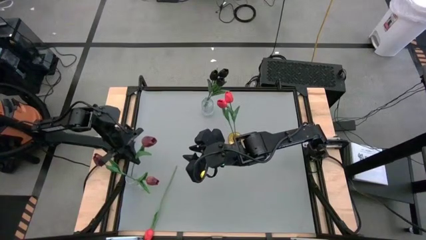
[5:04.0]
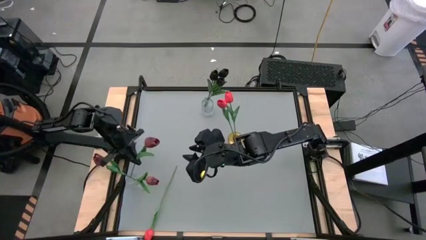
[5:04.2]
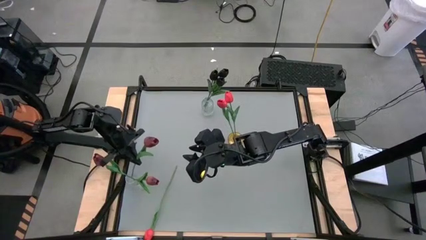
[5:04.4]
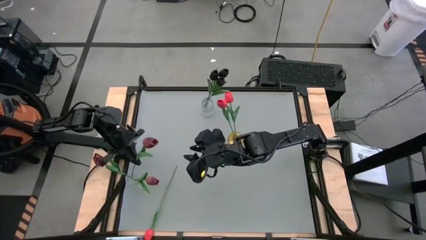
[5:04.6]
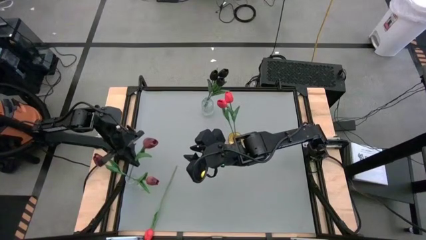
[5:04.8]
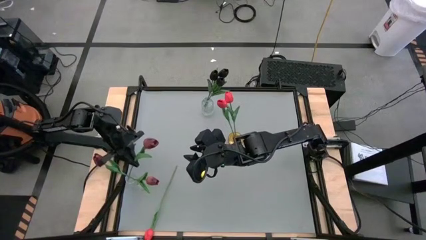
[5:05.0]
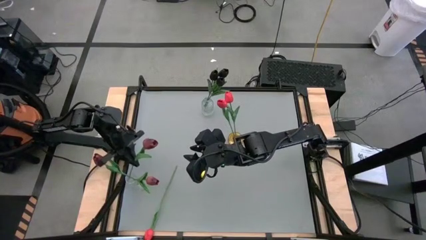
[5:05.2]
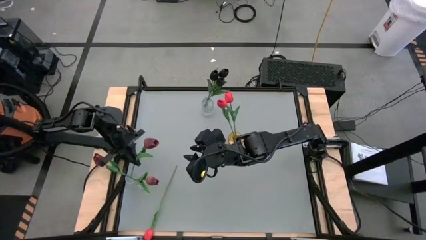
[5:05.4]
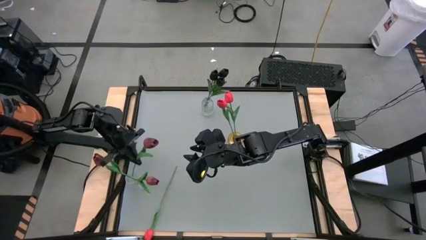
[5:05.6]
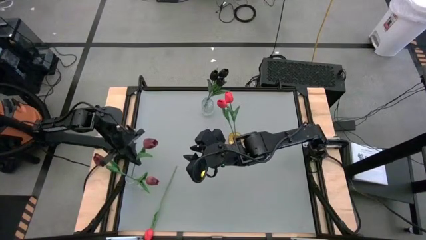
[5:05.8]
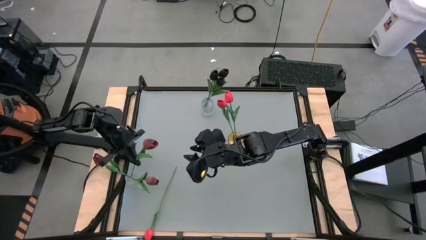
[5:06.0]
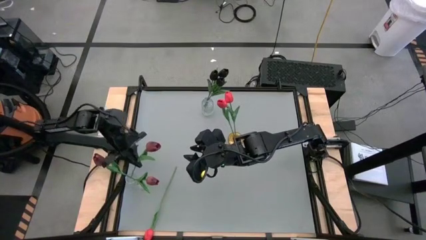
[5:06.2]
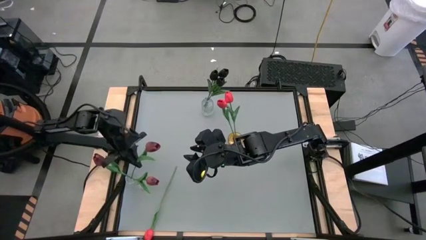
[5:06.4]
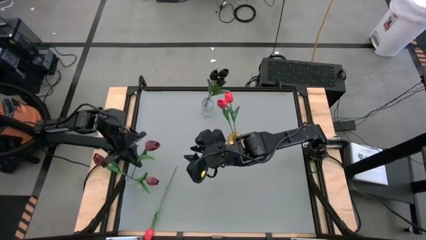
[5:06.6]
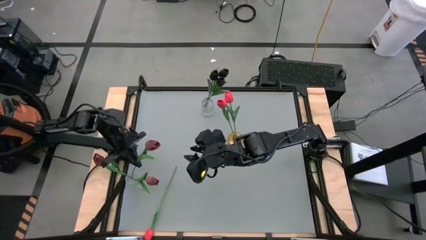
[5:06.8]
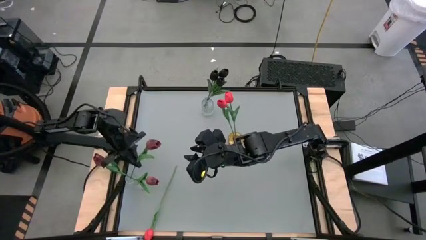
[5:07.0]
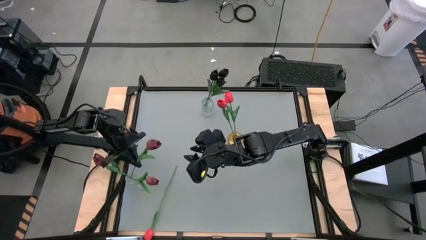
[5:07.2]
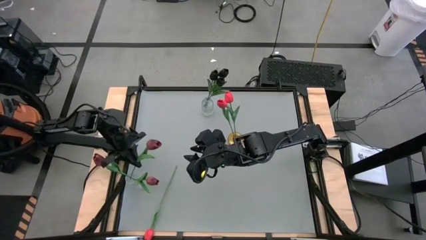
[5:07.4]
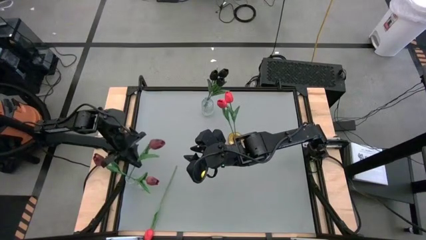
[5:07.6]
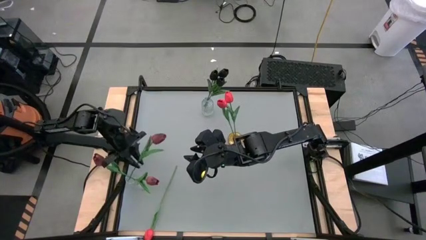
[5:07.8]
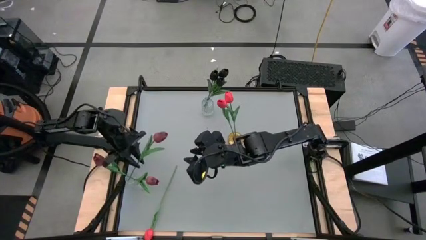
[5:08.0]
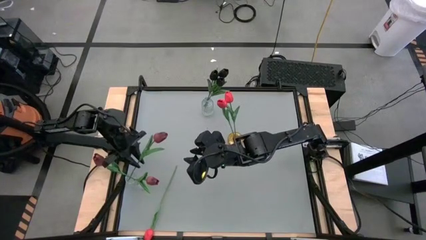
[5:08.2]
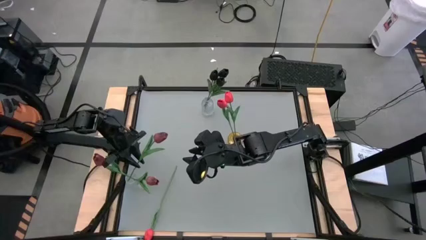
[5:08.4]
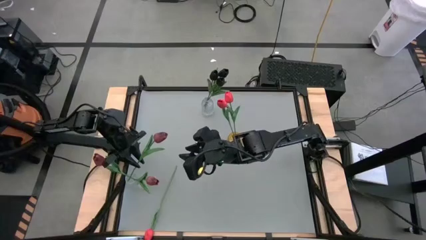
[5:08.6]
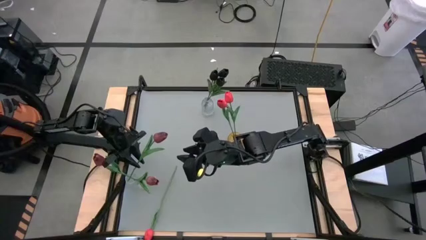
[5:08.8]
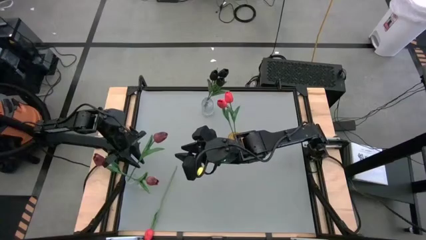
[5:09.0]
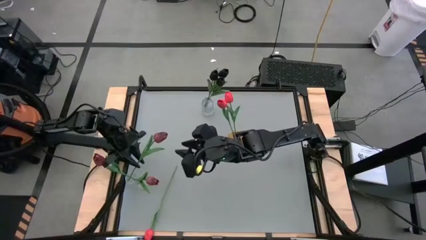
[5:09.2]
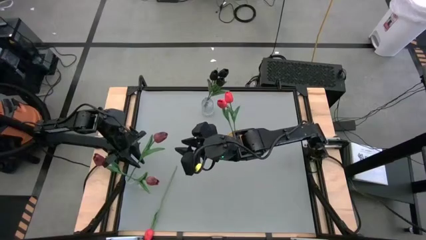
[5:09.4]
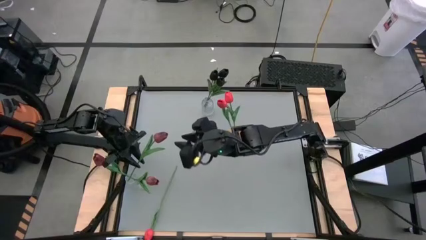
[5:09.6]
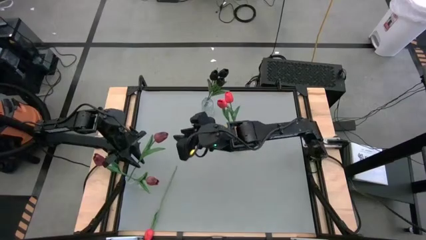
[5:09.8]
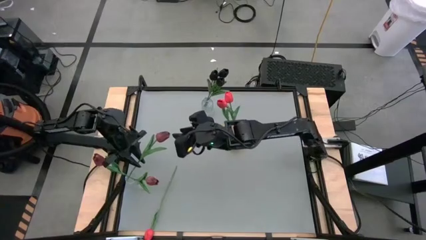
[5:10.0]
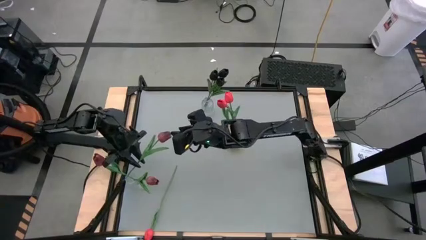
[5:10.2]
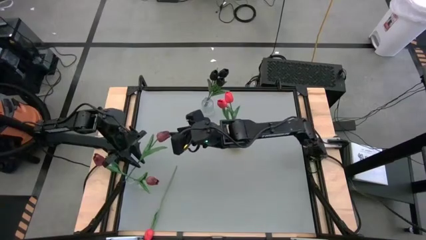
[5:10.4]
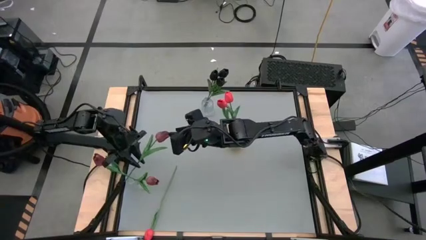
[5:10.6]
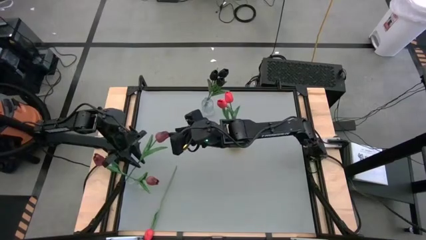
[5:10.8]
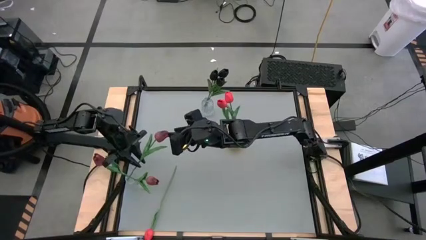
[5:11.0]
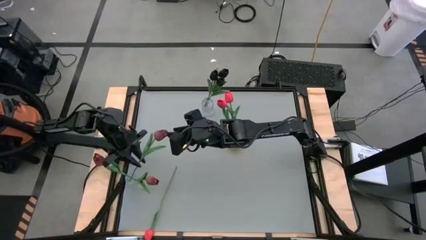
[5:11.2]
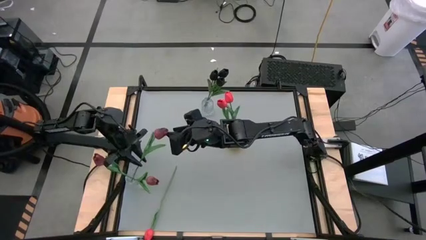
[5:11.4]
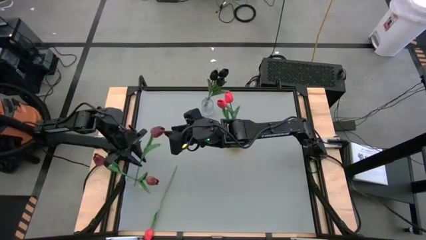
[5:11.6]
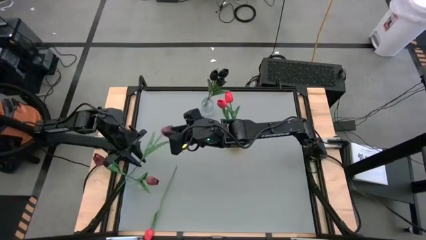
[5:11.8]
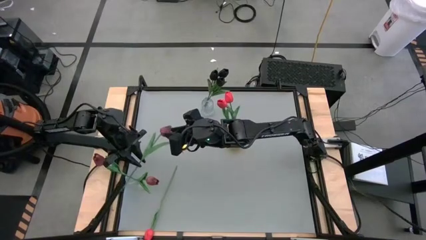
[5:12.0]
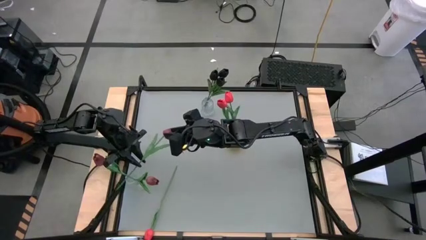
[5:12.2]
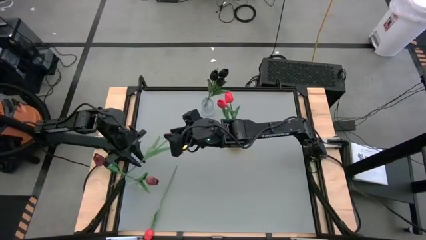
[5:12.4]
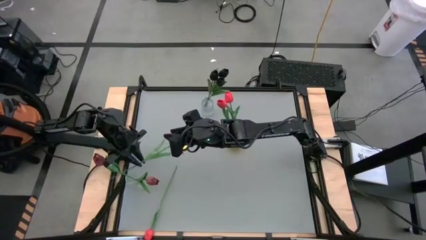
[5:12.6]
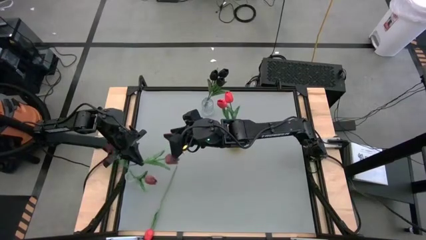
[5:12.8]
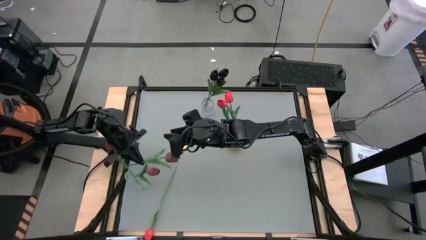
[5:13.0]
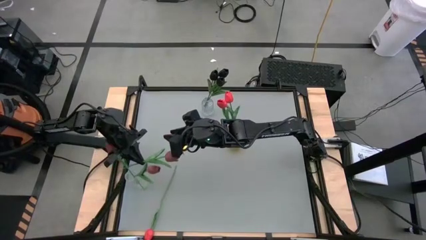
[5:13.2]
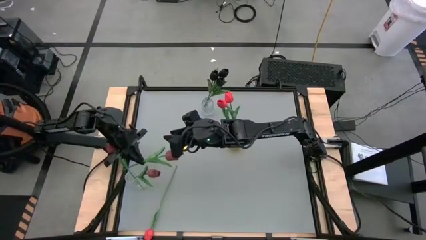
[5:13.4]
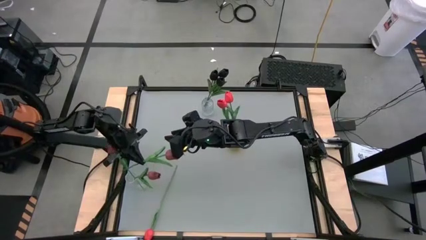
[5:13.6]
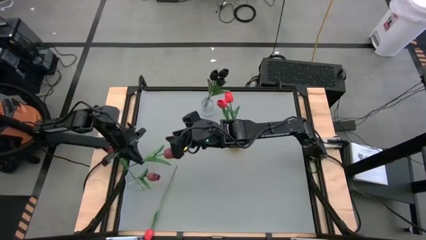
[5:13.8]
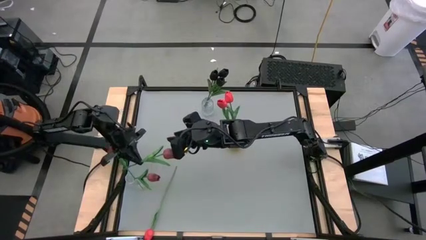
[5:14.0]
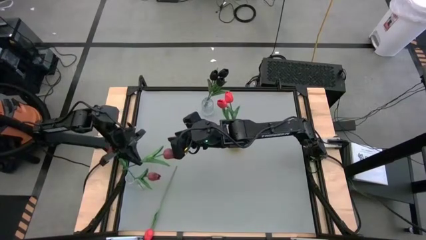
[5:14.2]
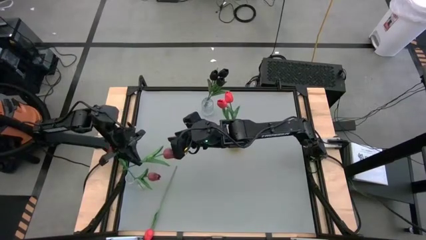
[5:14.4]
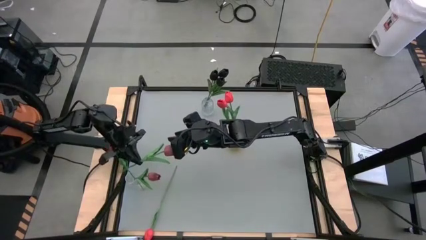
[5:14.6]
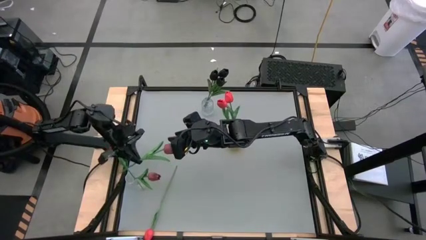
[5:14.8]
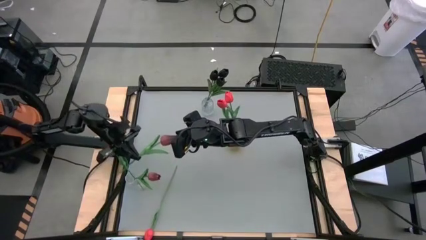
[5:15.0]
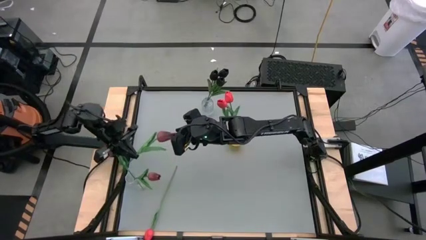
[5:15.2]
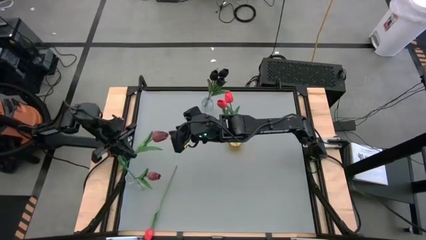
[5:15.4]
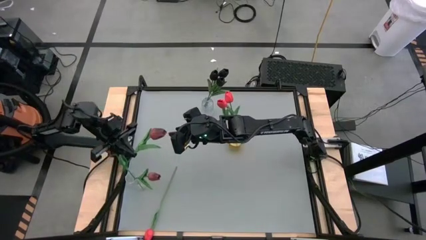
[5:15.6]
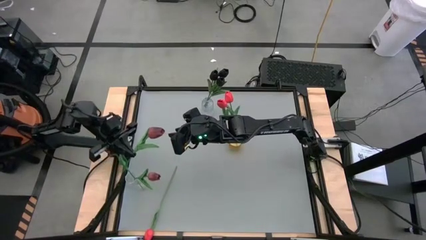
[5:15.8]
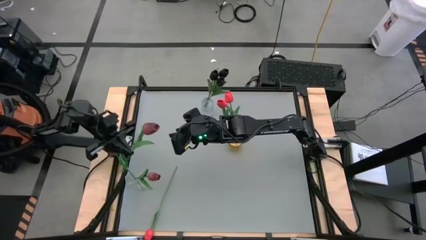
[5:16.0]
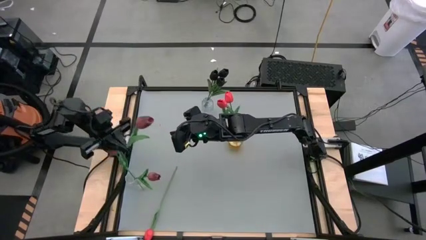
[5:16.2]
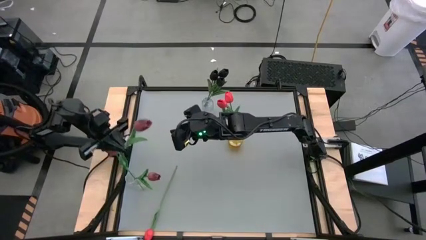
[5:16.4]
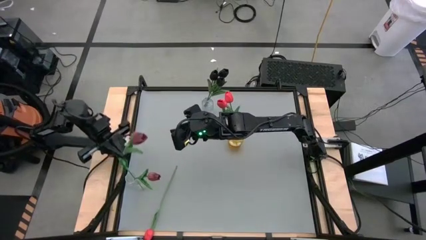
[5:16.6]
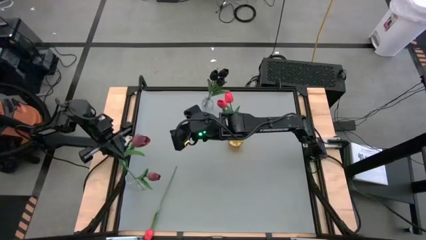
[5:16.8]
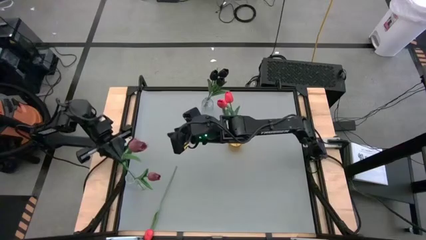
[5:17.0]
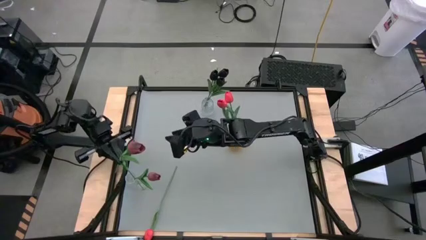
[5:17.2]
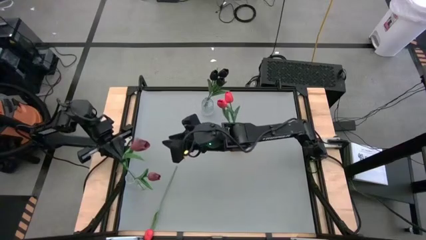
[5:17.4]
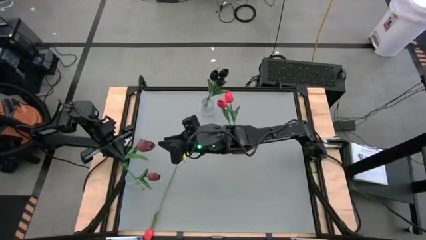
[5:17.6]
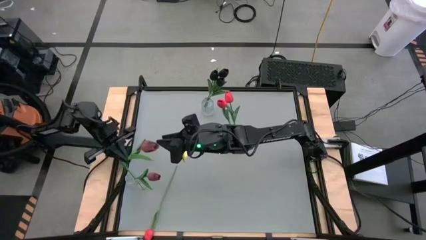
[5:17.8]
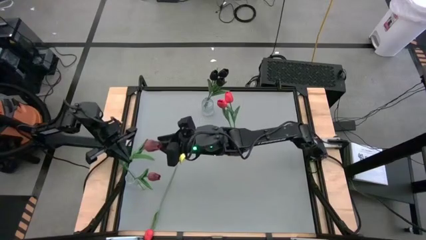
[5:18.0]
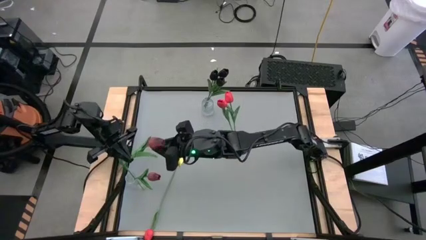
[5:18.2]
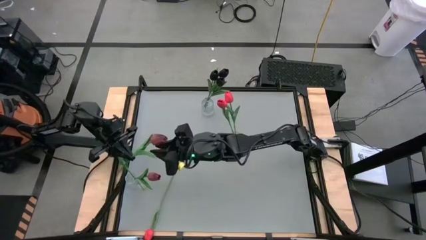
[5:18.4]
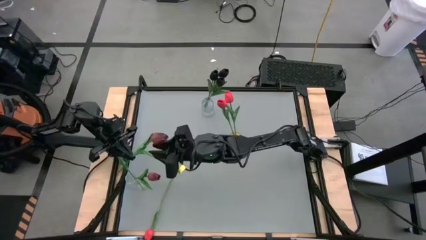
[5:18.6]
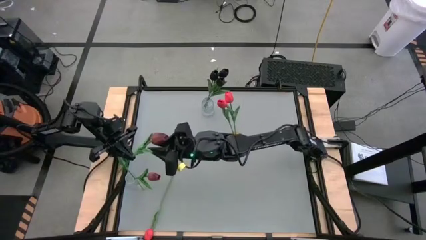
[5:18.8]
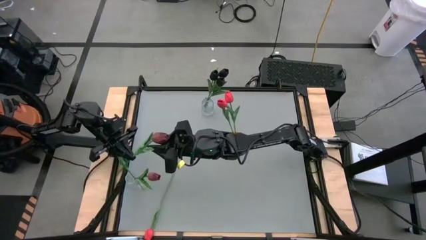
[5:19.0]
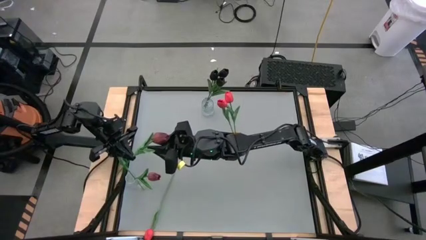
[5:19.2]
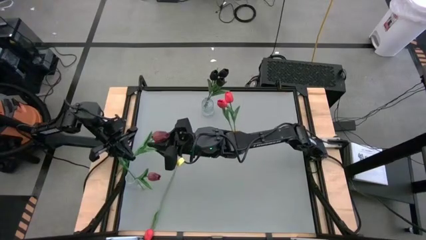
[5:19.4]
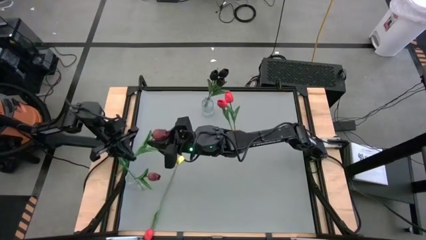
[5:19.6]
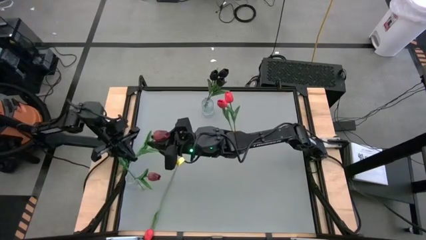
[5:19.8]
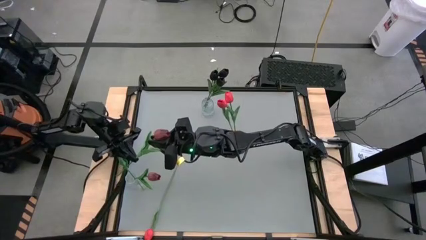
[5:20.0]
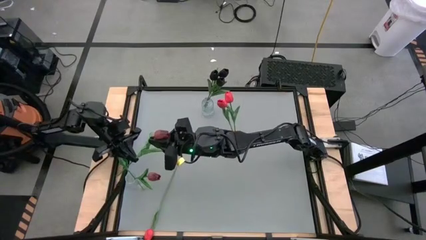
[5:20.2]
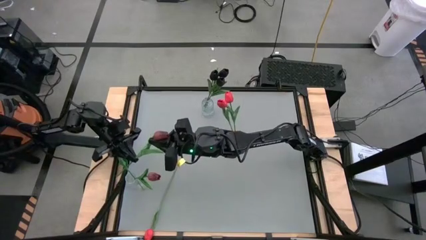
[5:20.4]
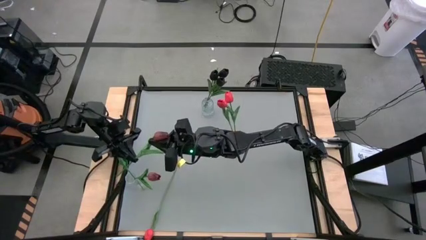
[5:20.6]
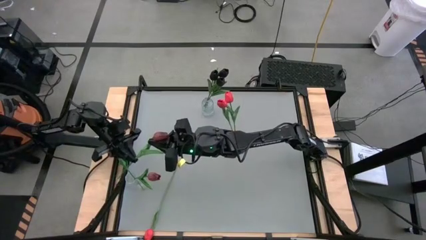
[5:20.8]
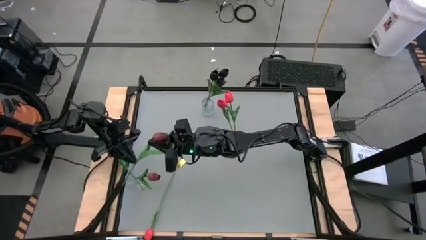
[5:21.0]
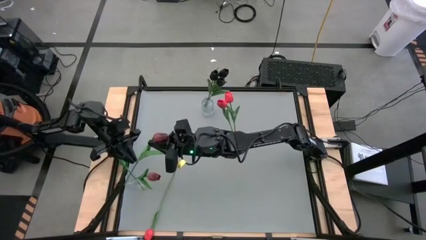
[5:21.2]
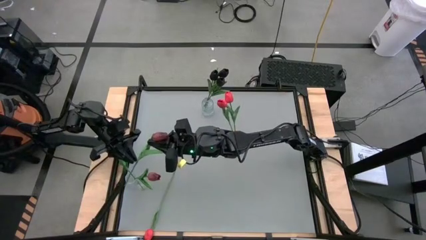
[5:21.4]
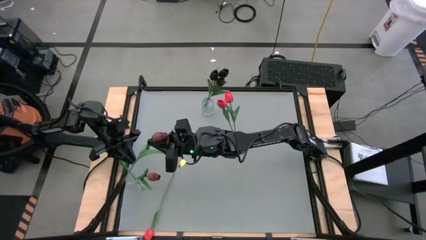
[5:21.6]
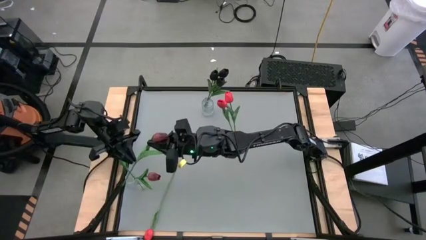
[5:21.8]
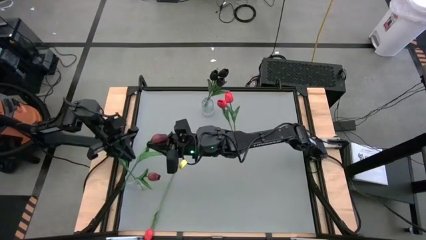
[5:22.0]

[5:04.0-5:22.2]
Task: Sort flowers into vase by color
Put the red tulip into the bottom transparent bin
